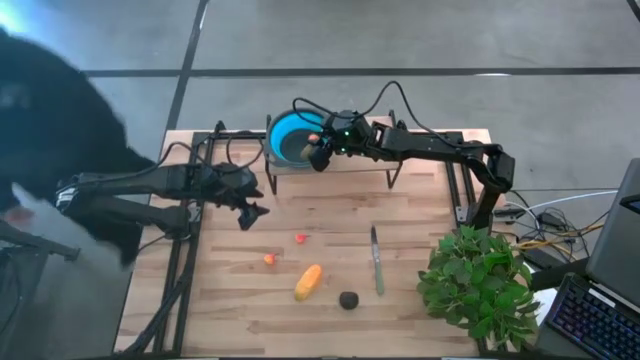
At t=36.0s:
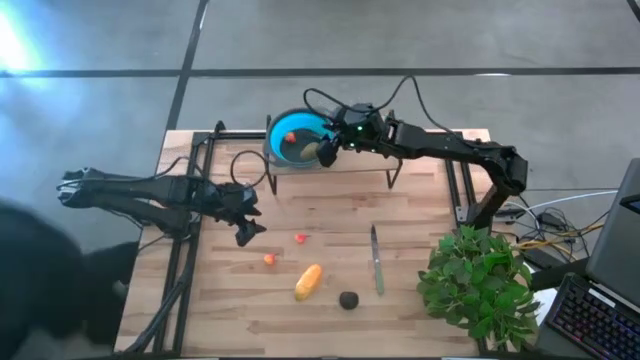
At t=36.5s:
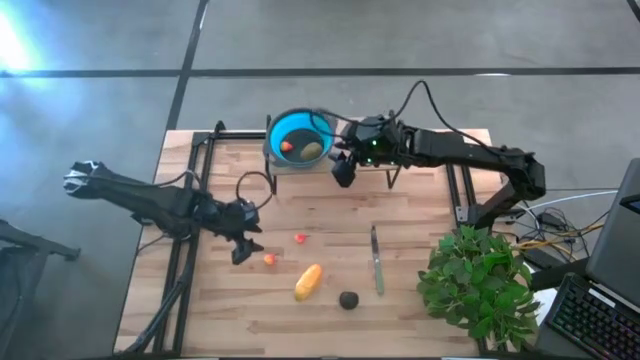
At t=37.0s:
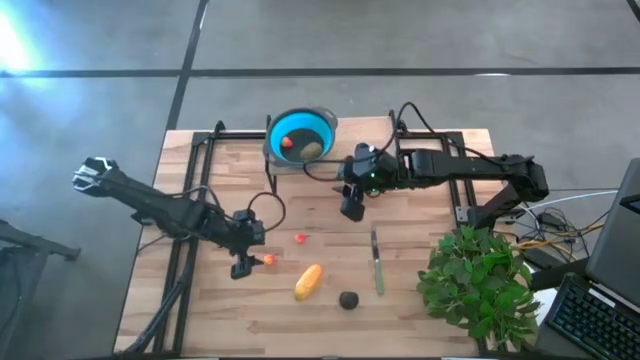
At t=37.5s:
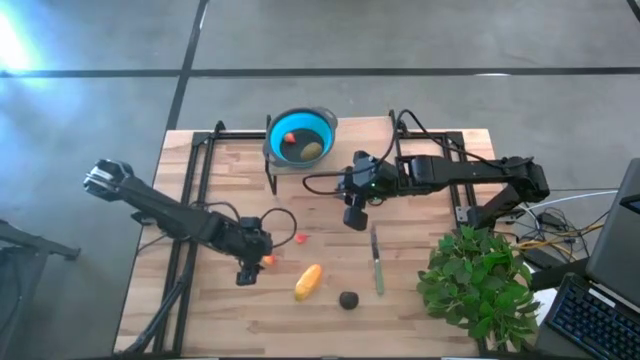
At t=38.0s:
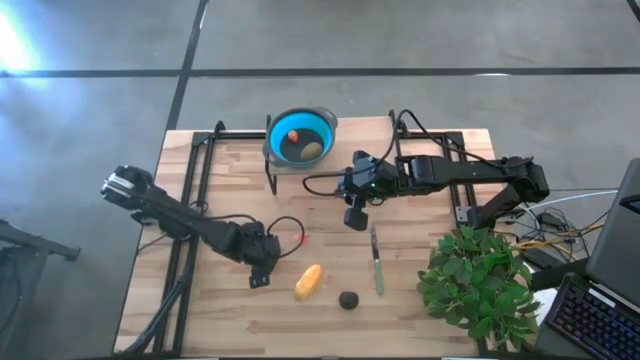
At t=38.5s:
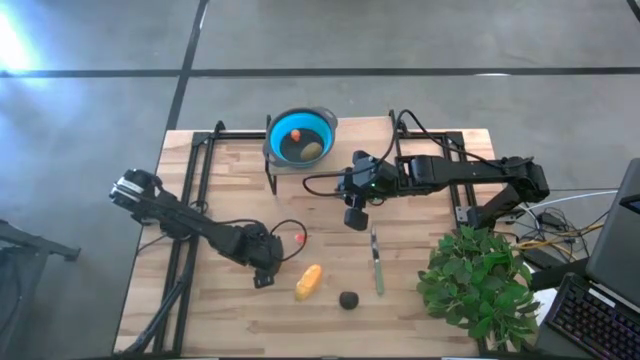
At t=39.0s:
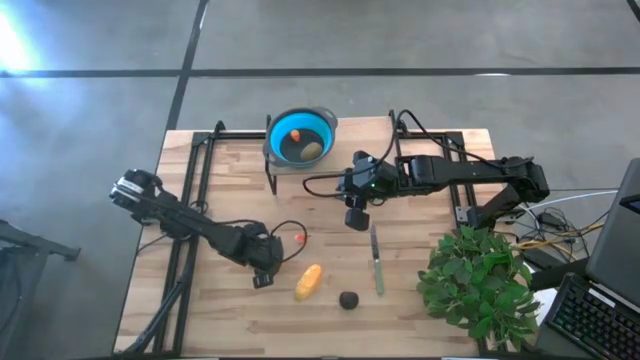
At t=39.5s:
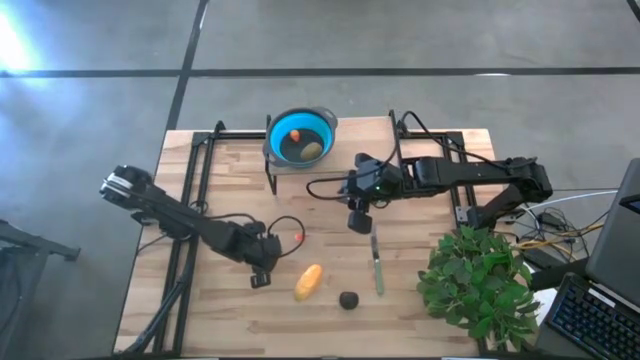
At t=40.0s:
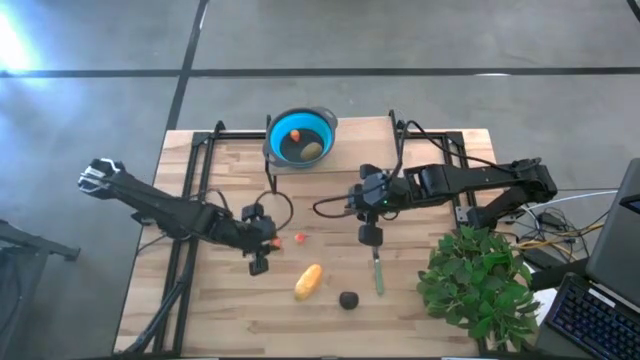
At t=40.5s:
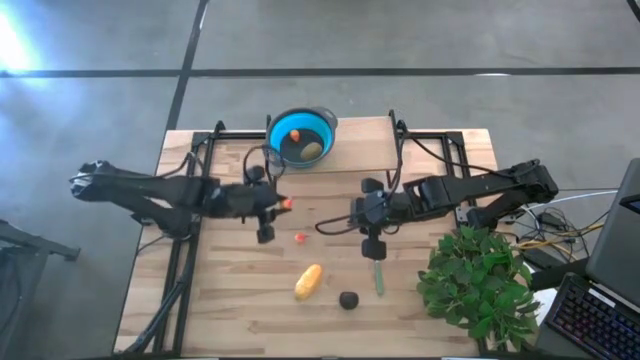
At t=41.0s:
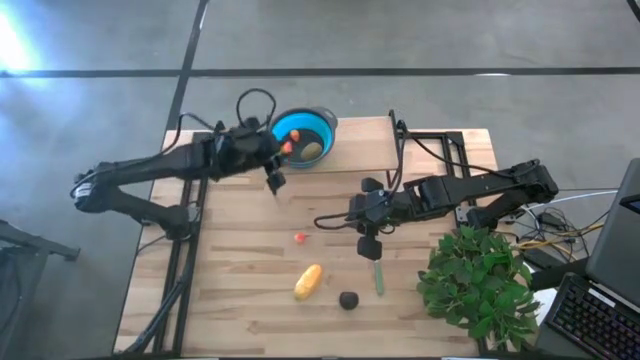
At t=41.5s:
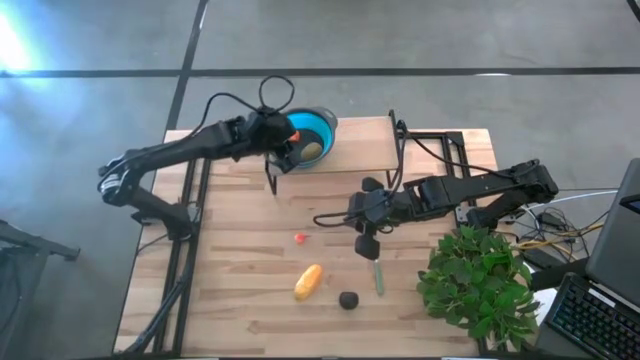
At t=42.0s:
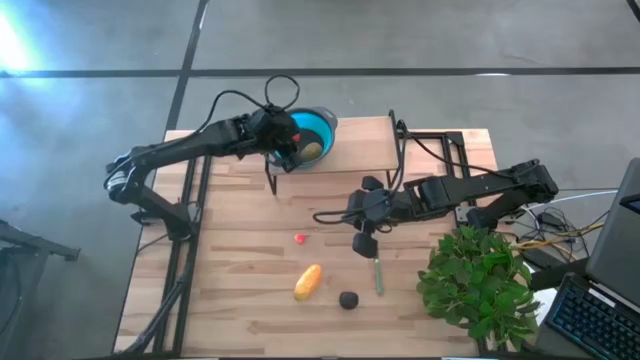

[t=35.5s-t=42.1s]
Task: Pick & Place Fruit
Put the left orange peach in the blue strainer bowl on the shelf

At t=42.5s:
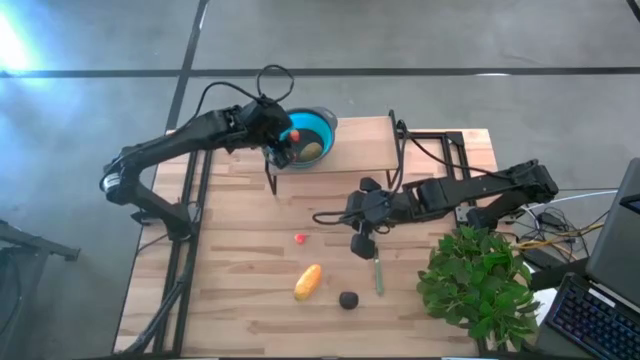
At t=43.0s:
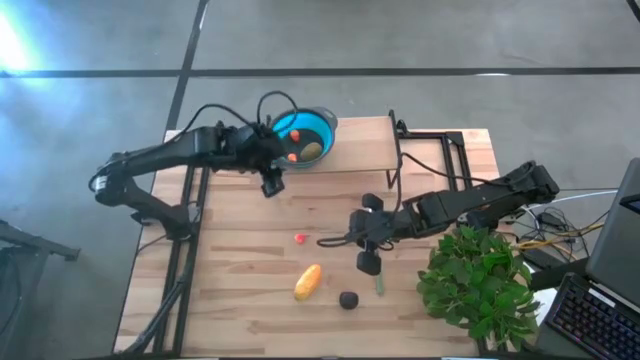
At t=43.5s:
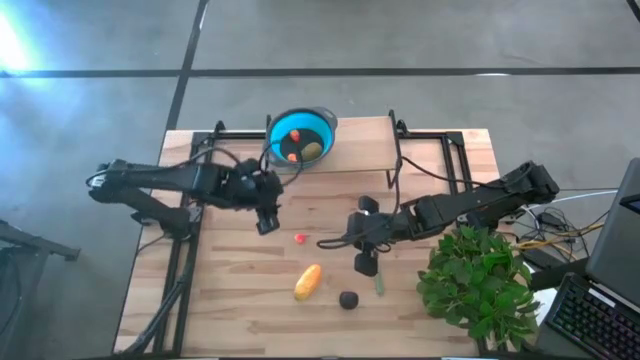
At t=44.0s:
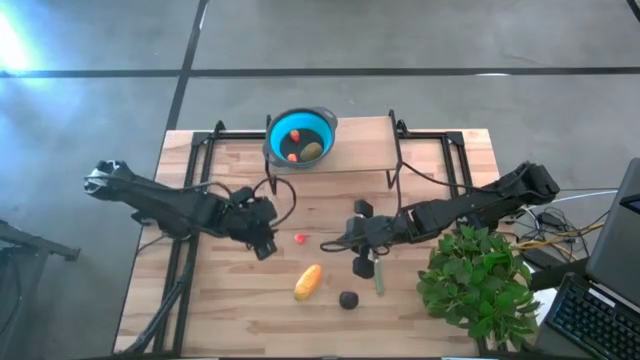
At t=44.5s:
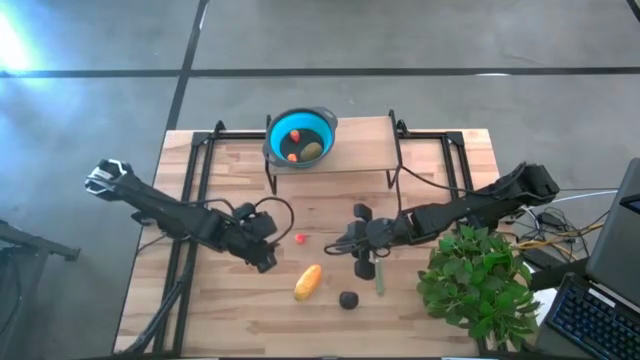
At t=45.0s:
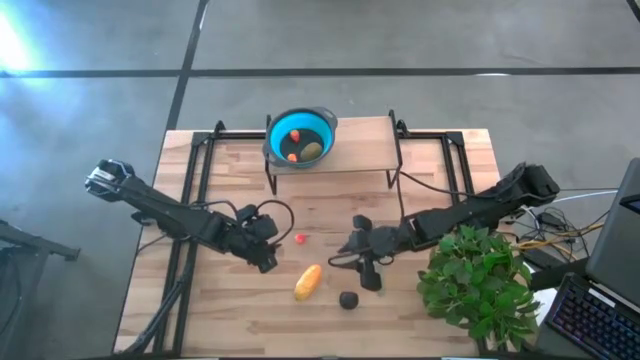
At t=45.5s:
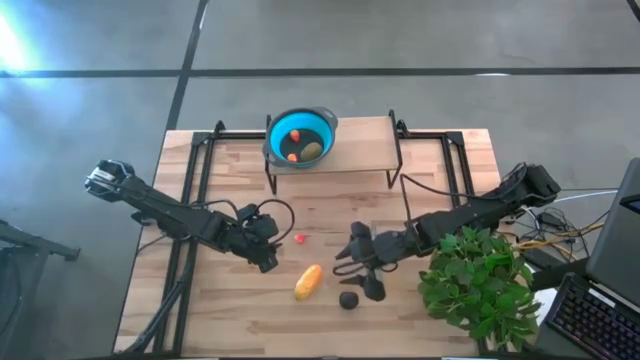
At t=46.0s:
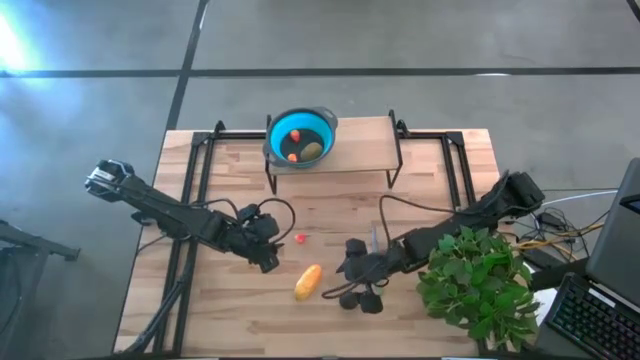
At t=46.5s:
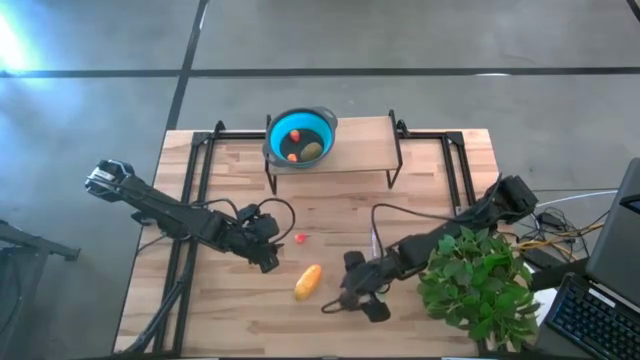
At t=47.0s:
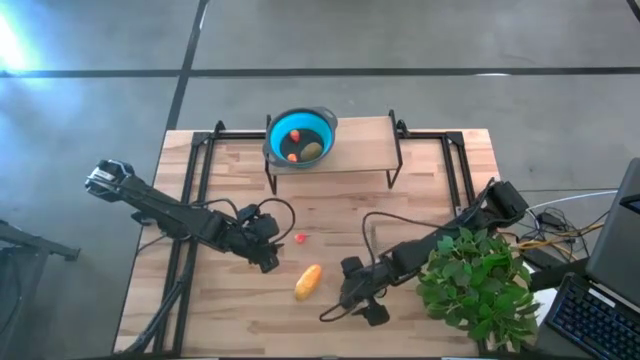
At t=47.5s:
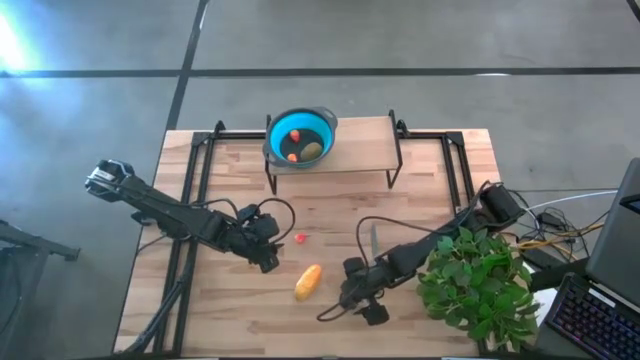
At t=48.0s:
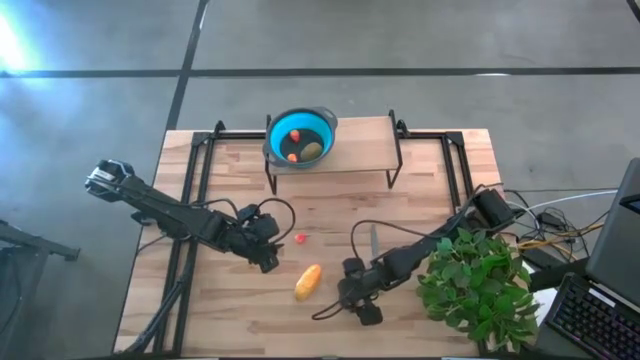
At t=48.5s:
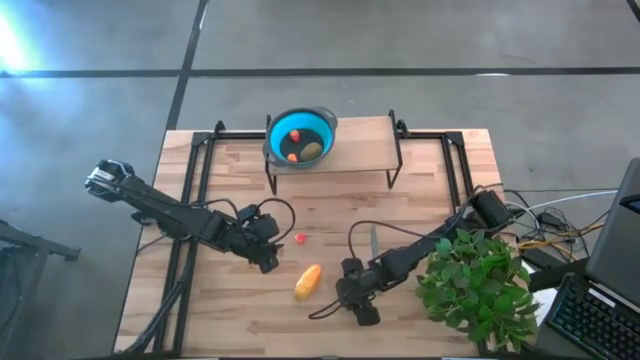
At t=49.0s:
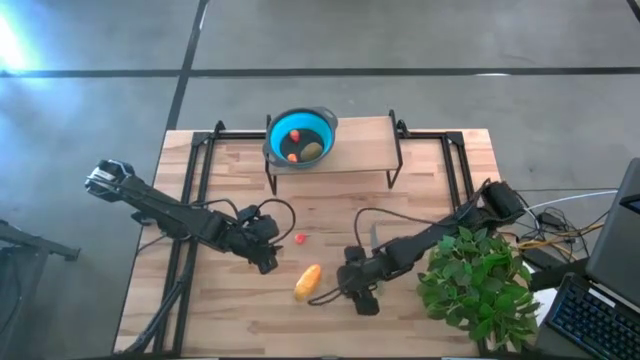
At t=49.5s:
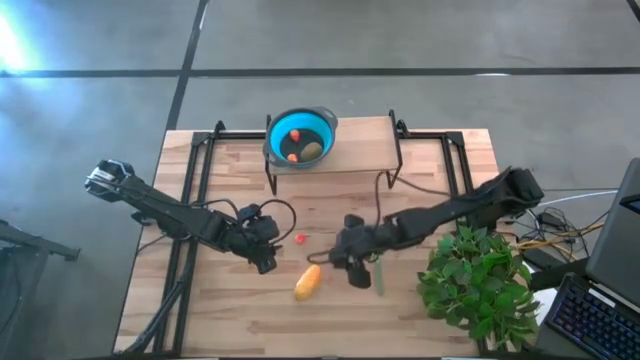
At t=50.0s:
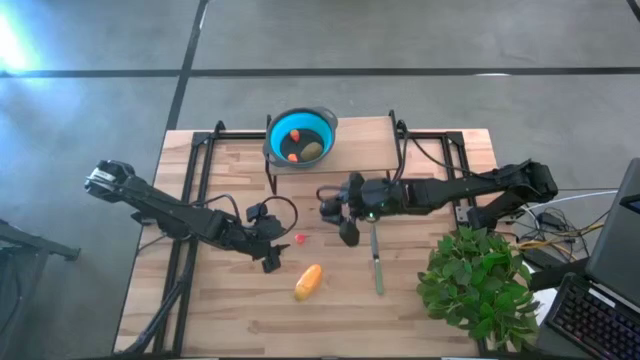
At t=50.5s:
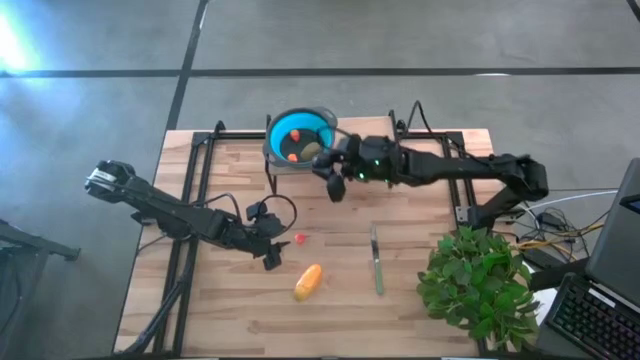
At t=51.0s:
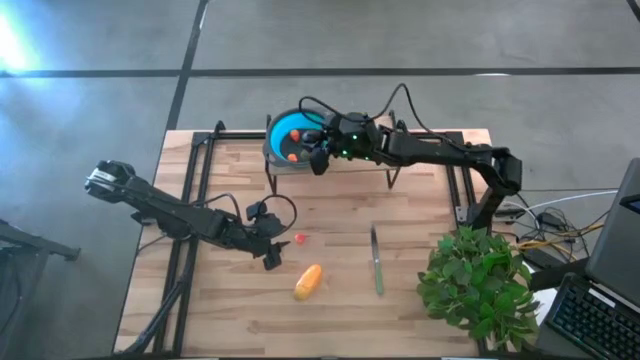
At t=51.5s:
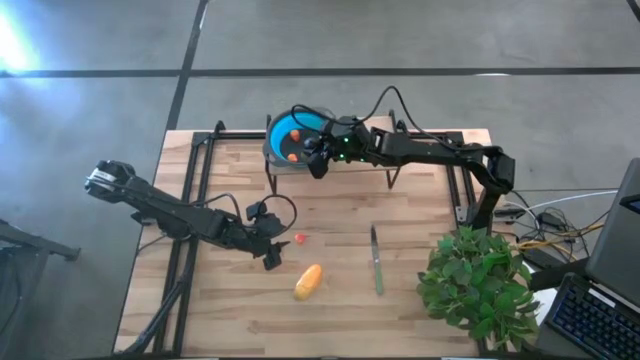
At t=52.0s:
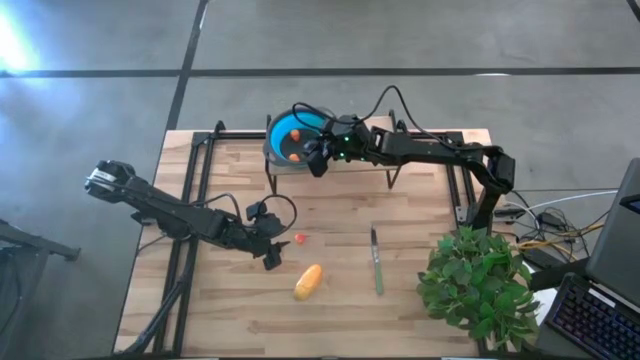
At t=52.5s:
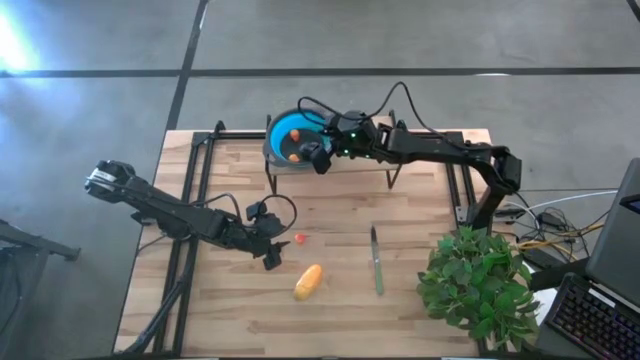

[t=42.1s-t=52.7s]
Put the purple plum in the blue strainer bowl on the shelf

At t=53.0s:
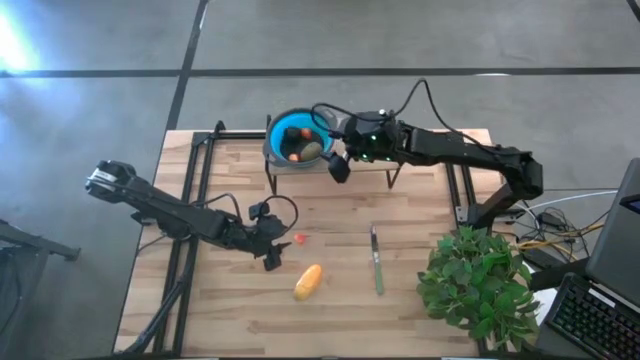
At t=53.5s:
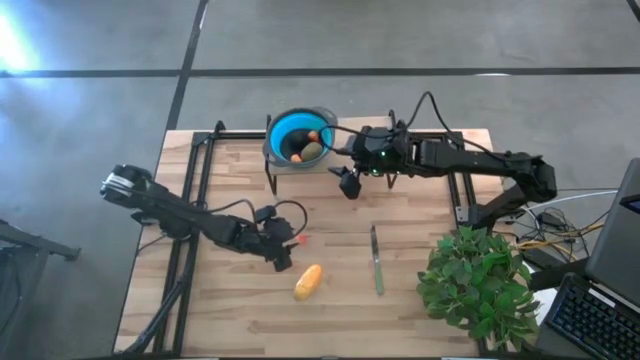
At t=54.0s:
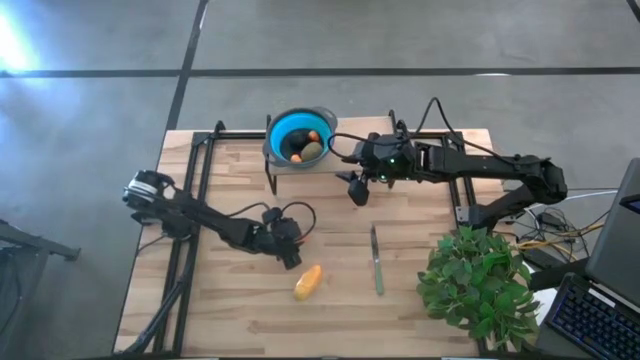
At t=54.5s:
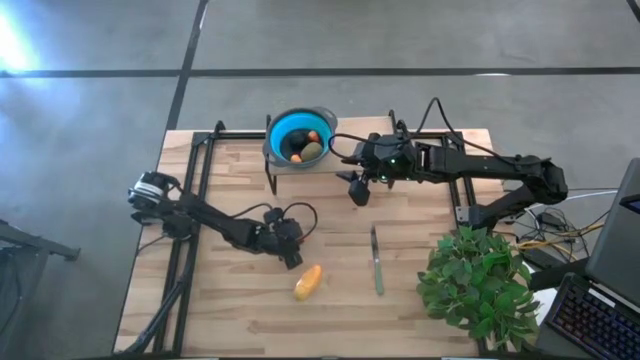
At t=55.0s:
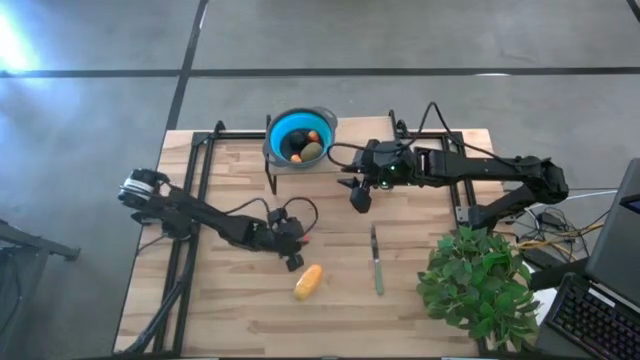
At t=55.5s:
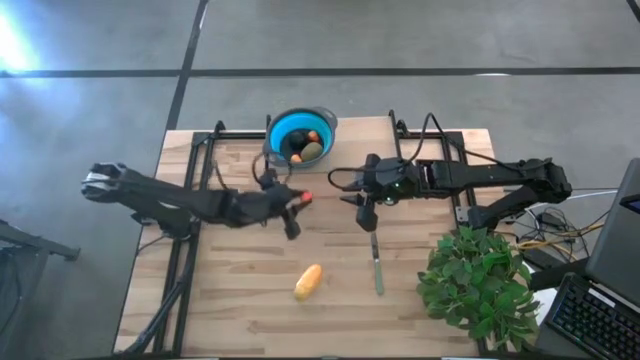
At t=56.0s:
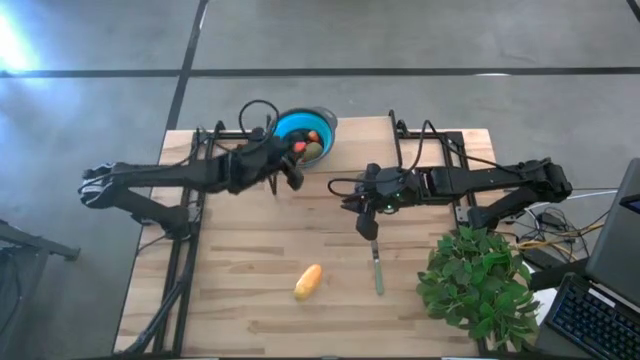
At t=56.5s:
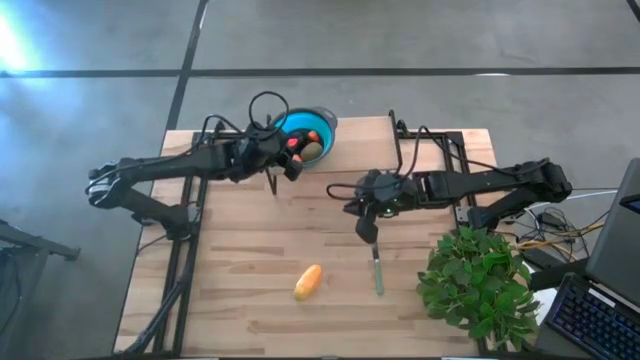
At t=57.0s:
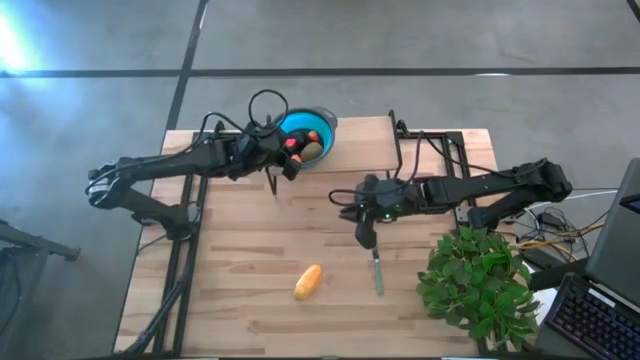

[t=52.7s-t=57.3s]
Put the orange peach in the blue strainer bowl on the shelf
